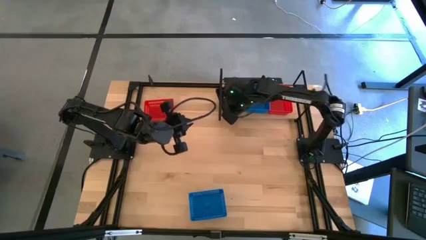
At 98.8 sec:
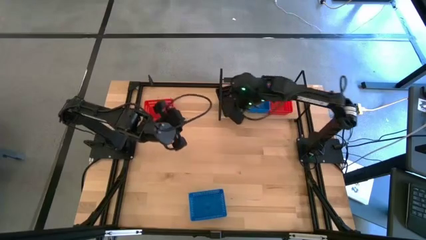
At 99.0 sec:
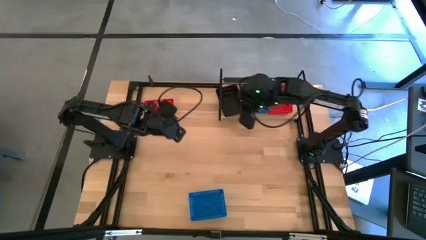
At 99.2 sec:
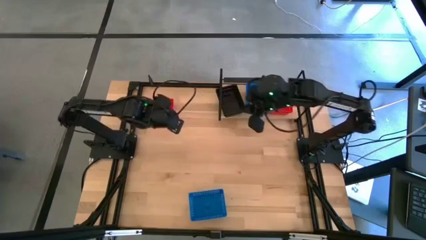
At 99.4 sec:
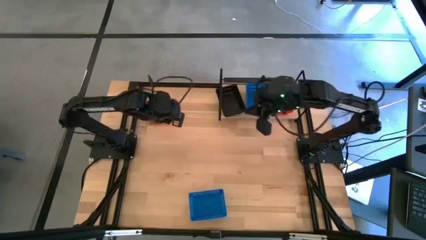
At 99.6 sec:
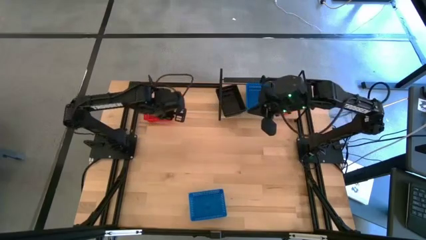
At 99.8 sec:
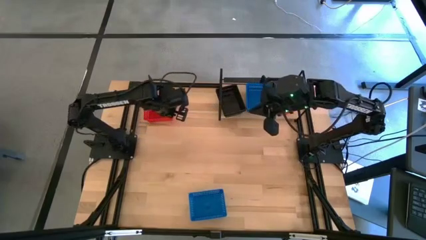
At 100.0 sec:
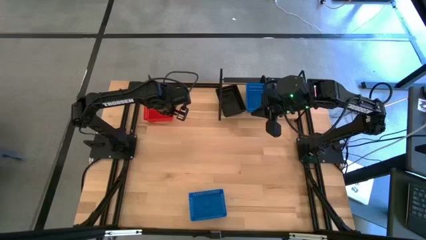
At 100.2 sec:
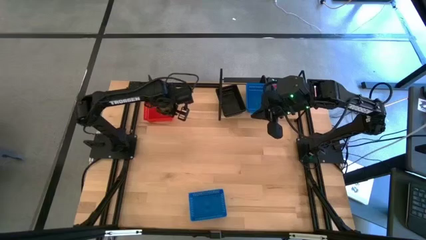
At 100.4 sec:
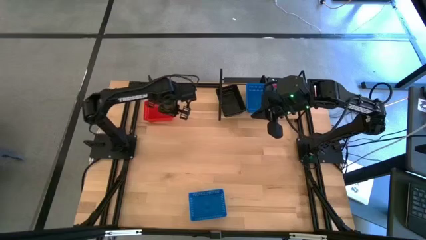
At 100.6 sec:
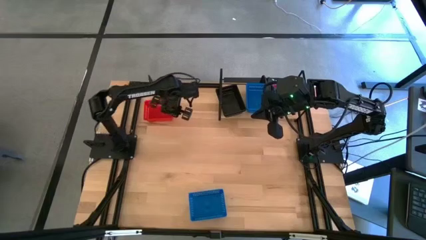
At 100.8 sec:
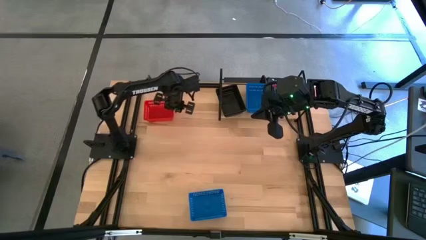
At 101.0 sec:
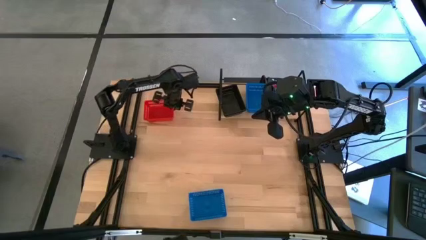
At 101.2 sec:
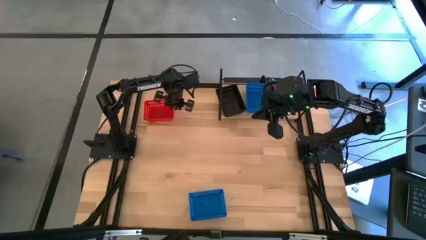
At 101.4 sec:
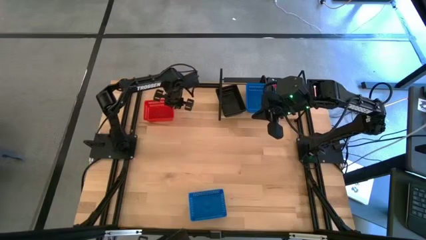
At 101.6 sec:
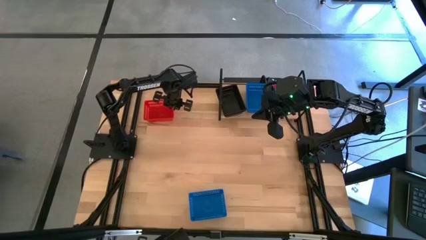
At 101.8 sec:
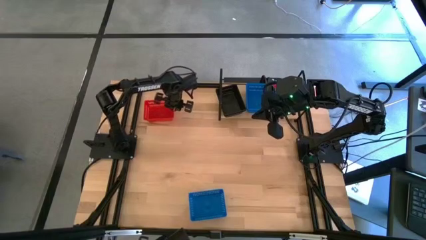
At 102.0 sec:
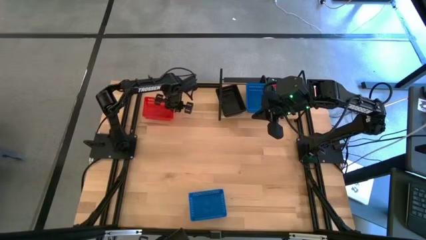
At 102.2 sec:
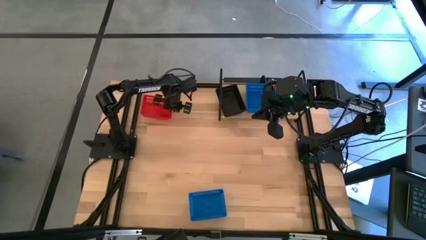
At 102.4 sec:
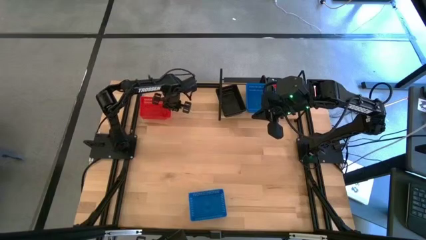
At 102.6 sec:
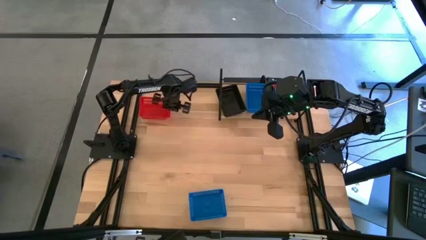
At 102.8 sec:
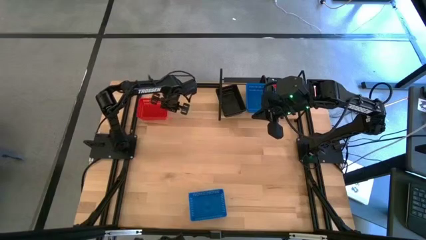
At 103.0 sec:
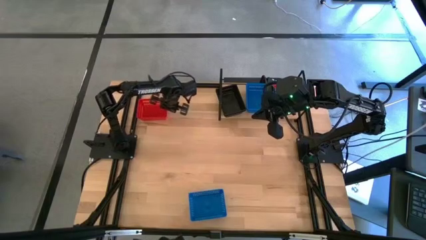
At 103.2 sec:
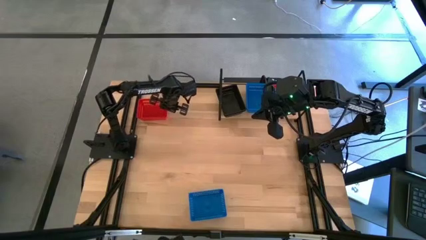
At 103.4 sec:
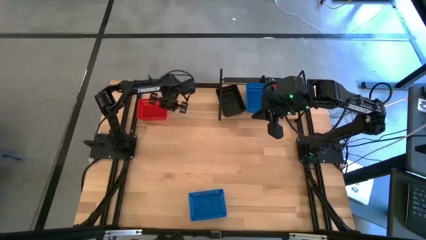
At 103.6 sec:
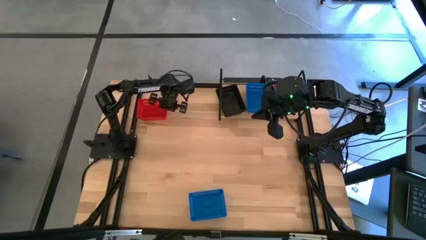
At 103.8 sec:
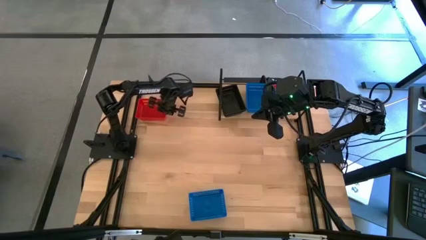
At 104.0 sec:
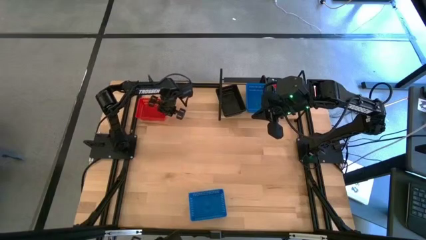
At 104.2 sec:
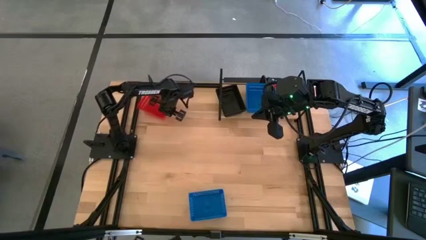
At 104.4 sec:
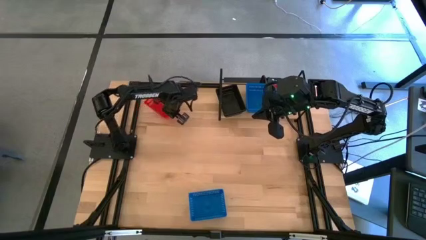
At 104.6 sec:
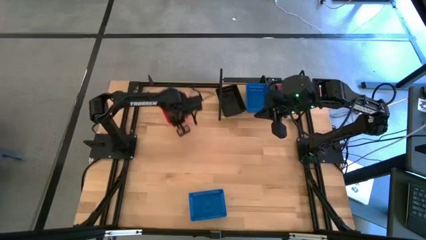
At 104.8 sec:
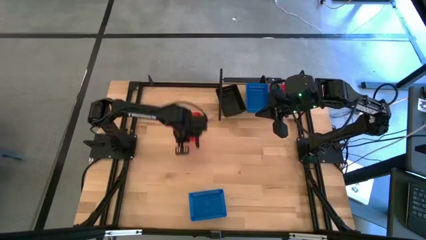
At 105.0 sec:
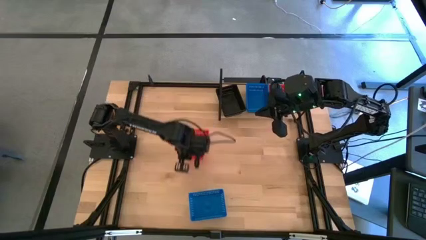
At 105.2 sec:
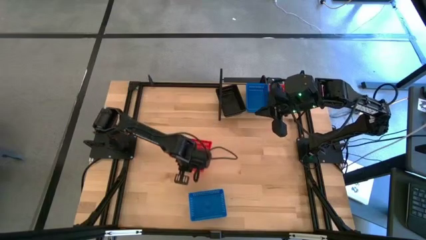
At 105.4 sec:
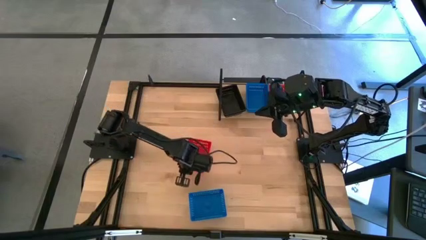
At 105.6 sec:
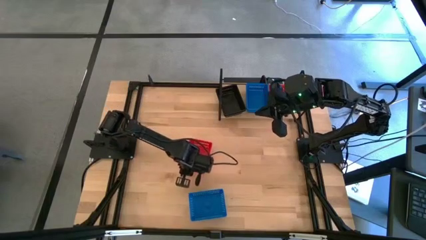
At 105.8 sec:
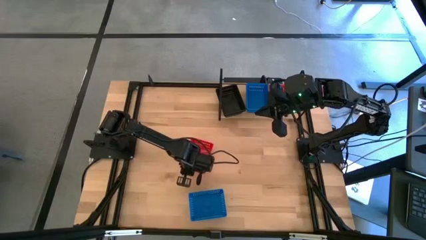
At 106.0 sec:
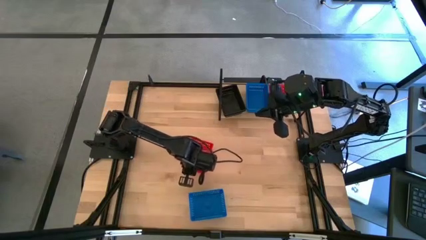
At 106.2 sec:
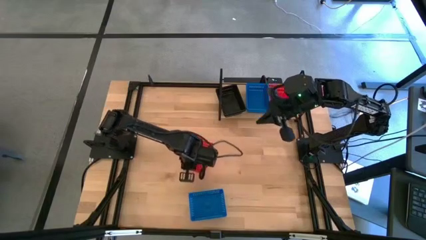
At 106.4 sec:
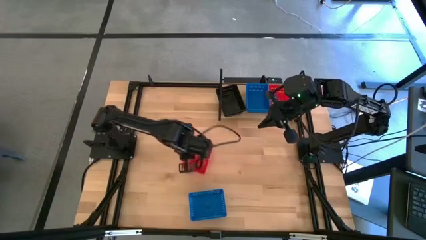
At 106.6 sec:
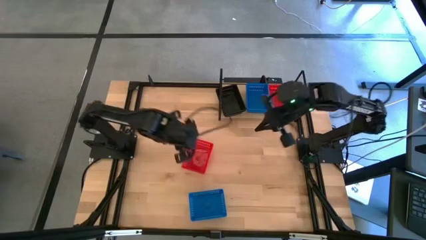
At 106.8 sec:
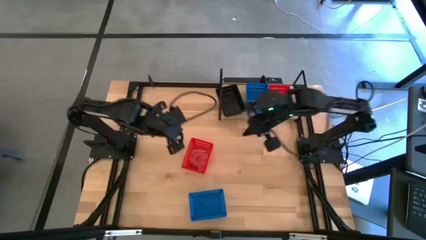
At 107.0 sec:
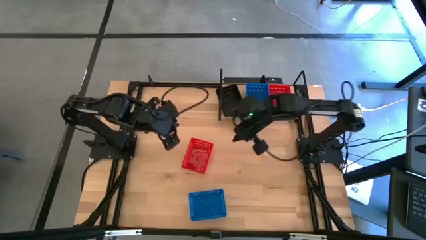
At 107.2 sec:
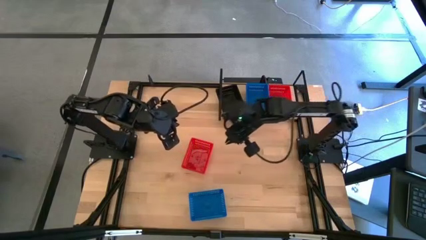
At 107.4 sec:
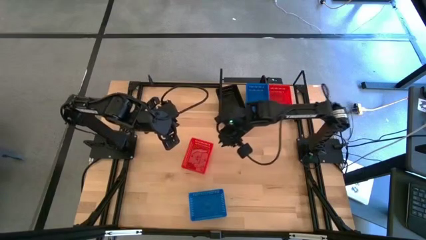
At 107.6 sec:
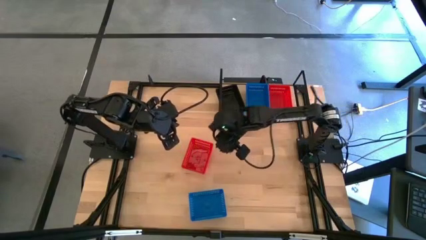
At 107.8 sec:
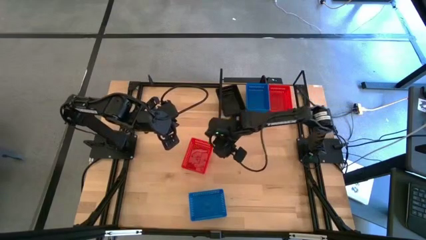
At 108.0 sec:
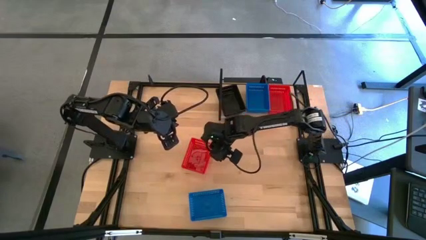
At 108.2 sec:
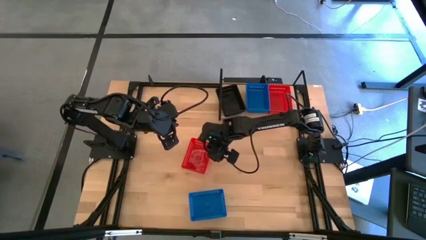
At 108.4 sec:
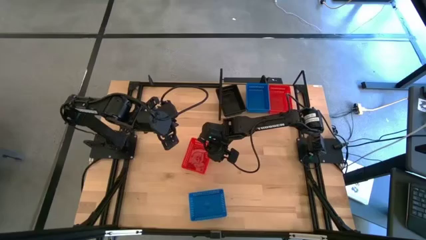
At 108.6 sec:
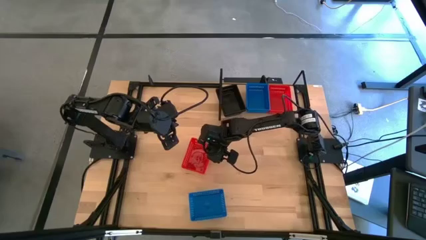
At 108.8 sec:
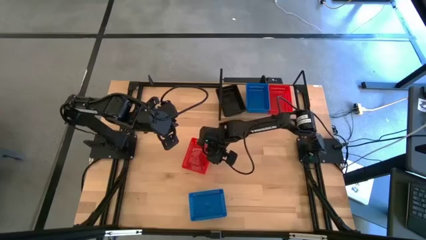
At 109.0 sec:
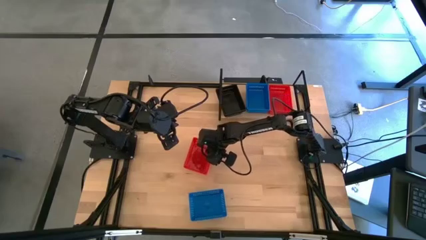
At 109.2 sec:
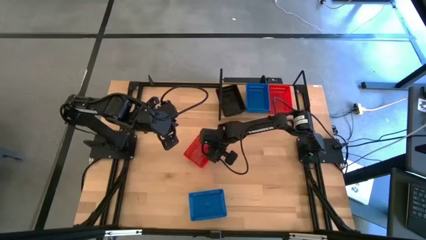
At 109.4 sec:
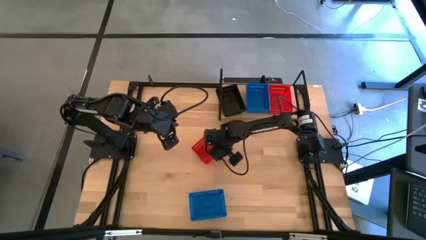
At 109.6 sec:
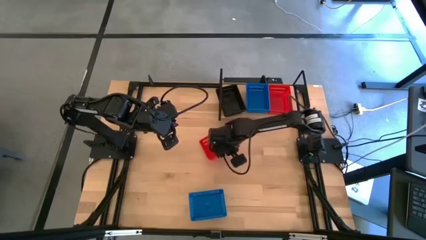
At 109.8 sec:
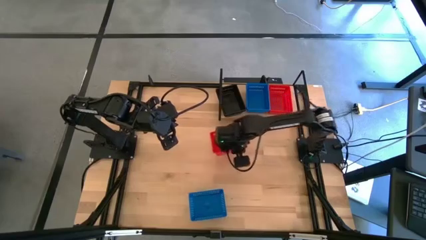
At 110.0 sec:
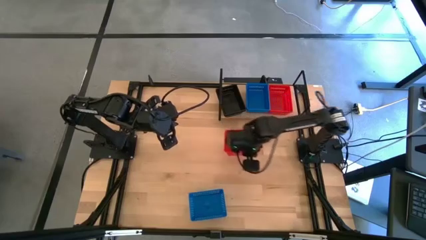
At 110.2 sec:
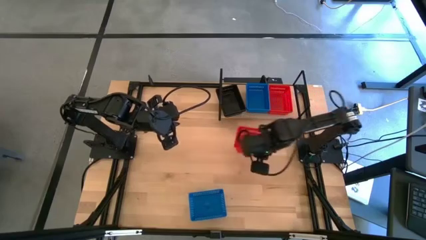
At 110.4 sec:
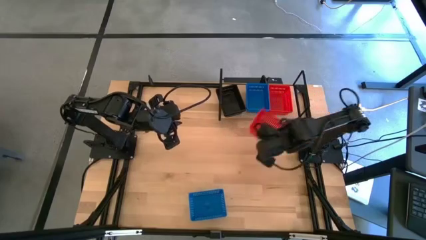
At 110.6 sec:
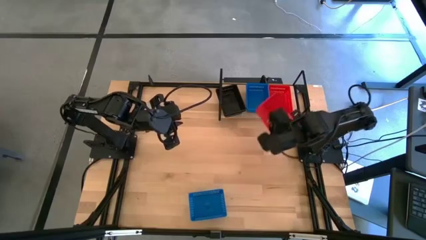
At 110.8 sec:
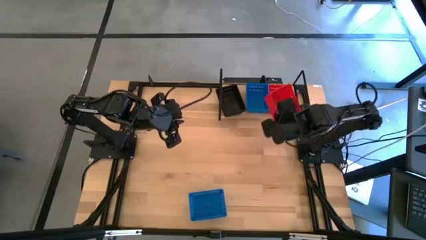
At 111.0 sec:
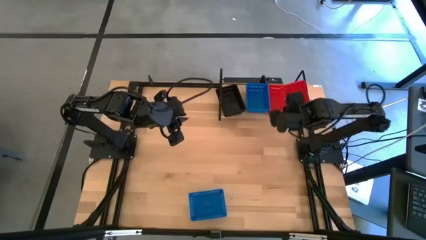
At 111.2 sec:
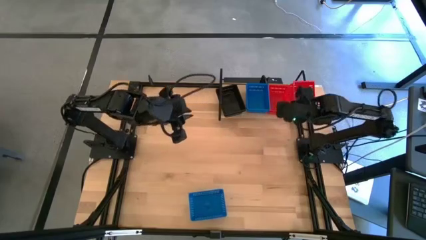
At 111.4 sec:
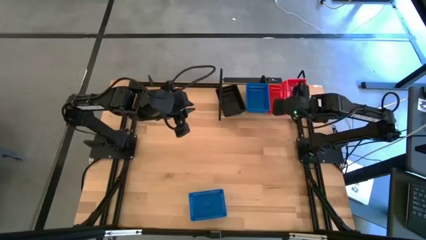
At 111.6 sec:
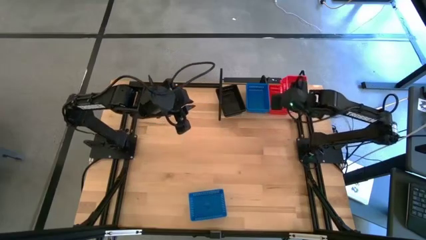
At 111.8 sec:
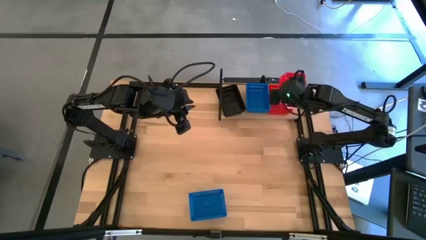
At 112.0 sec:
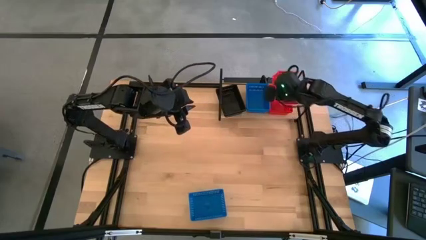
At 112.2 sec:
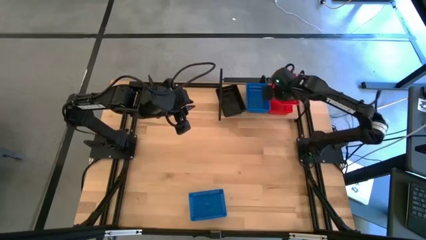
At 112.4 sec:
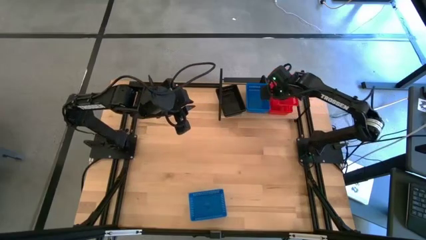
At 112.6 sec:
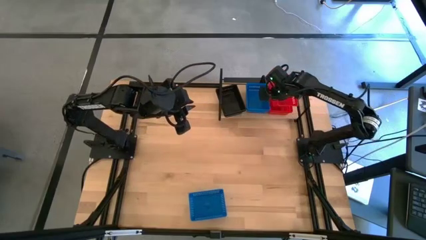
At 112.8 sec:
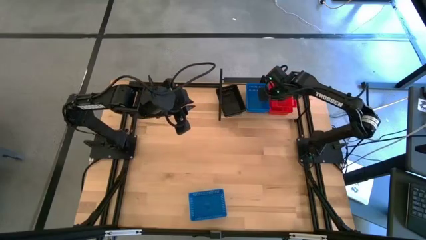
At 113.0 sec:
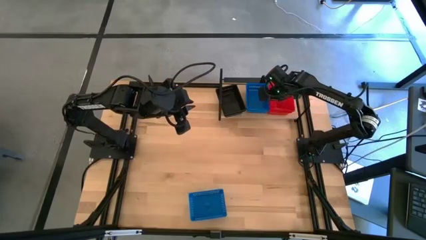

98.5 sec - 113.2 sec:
Task: Stack baskets on shelf by color
Stack the red bin on top of the other stacked red bin on the shelf

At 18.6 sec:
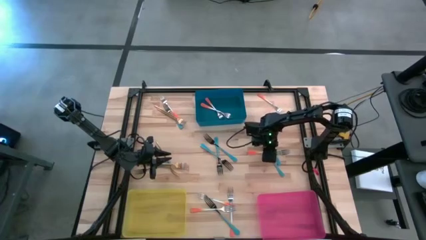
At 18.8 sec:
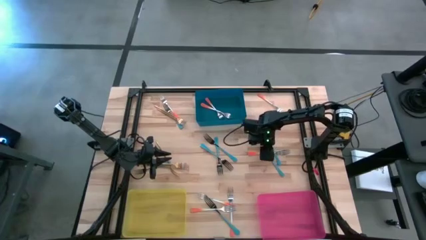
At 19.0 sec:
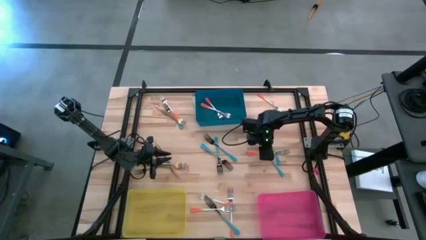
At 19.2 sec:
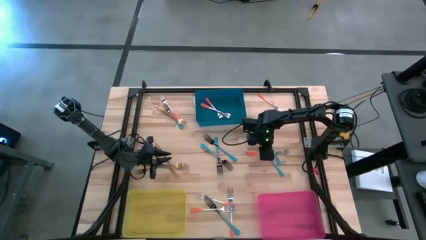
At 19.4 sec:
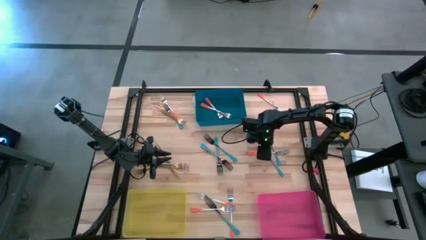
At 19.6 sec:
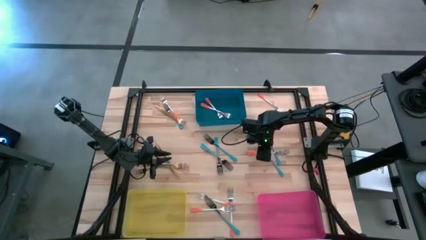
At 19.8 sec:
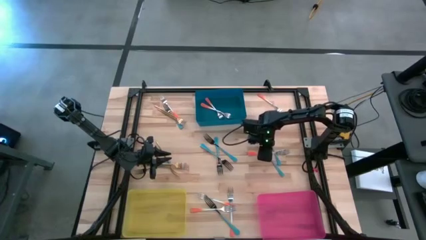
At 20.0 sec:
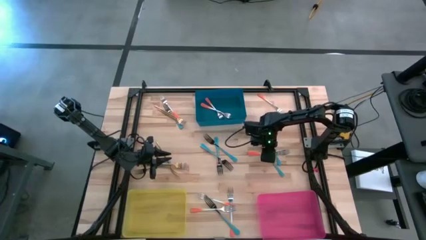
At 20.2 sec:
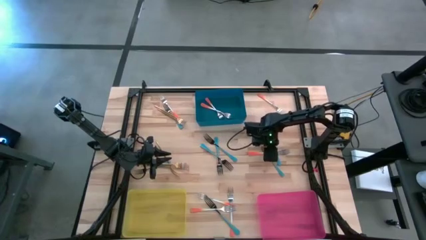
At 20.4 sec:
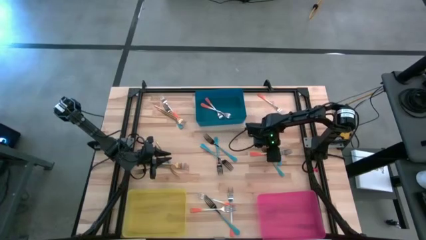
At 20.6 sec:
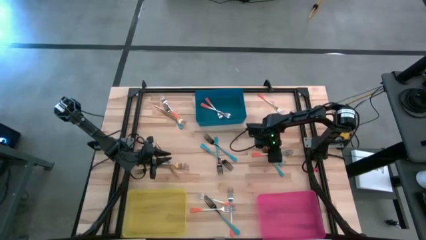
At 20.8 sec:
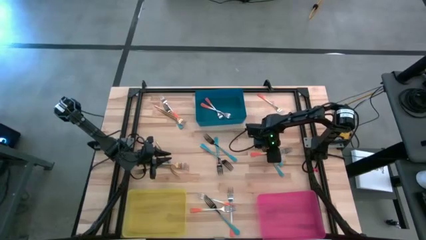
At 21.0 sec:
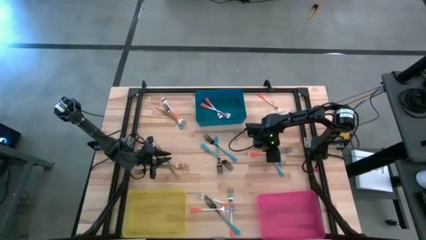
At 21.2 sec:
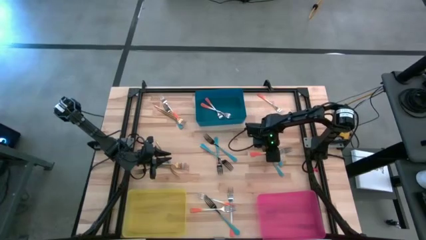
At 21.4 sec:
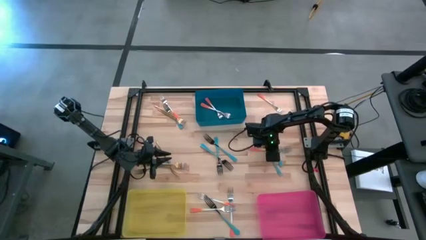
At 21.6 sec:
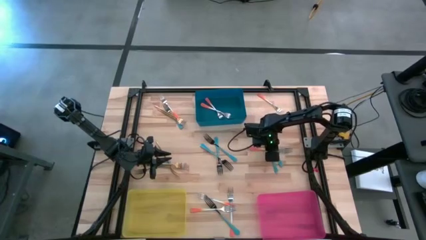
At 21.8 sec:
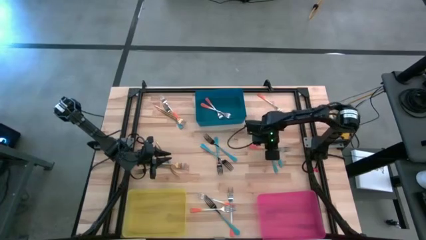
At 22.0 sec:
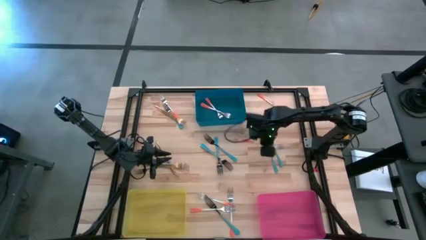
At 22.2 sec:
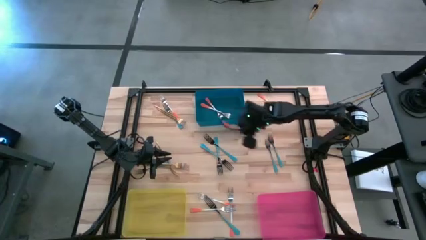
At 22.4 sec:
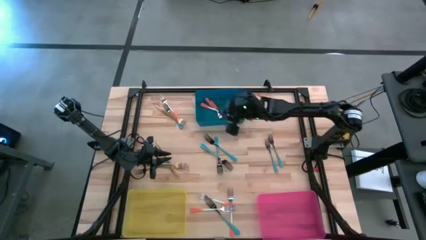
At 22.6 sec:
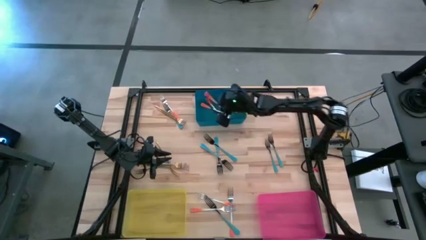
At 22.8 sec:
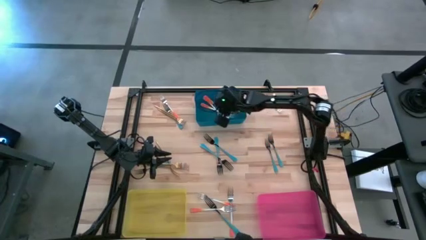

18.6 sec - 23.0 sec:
Task: Sort silverware by color (type)
Put the orange fork into the blue bin
